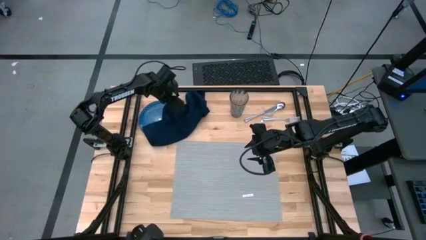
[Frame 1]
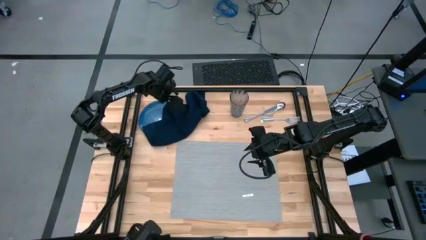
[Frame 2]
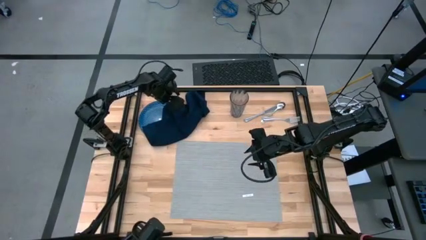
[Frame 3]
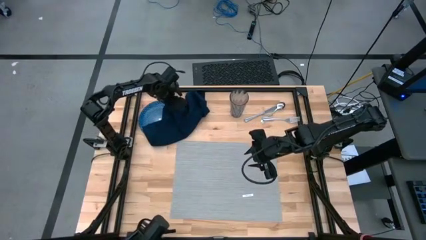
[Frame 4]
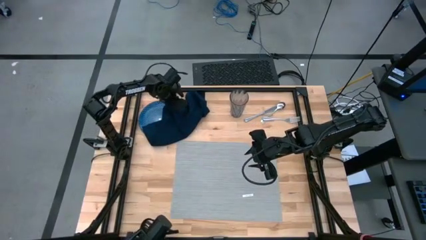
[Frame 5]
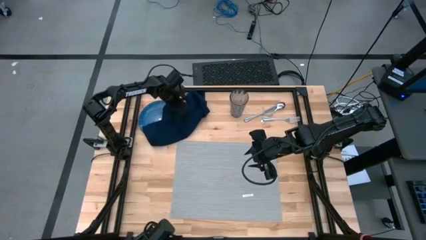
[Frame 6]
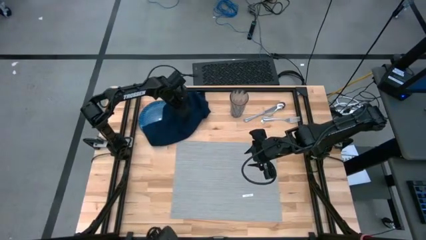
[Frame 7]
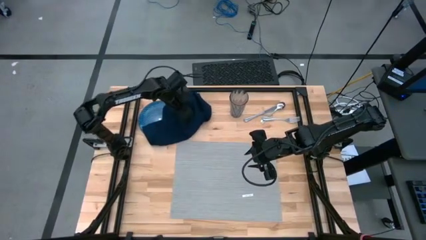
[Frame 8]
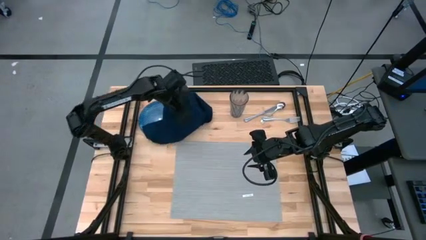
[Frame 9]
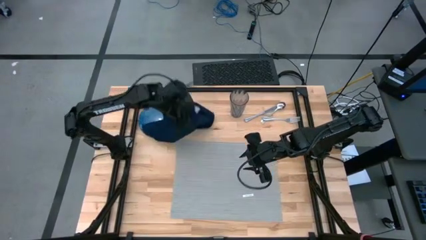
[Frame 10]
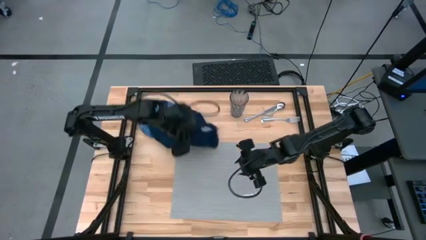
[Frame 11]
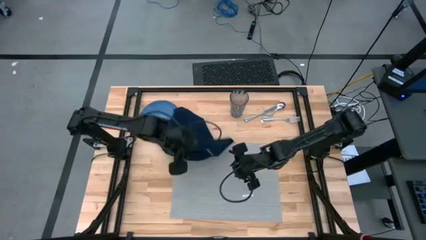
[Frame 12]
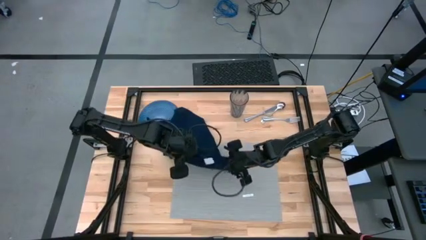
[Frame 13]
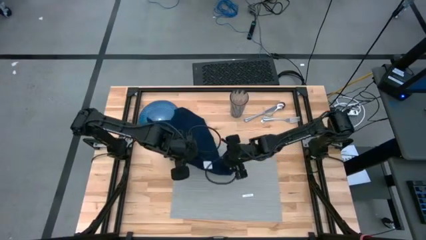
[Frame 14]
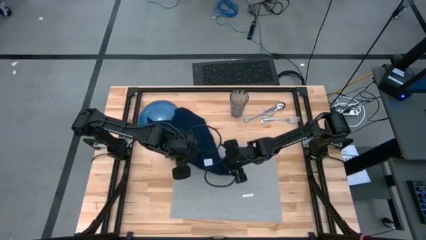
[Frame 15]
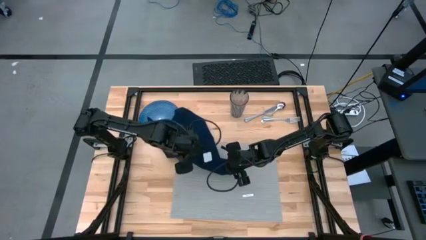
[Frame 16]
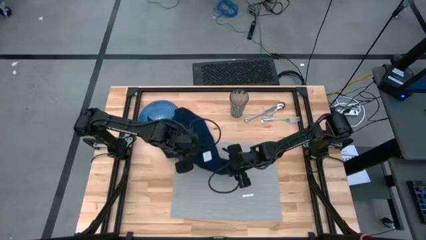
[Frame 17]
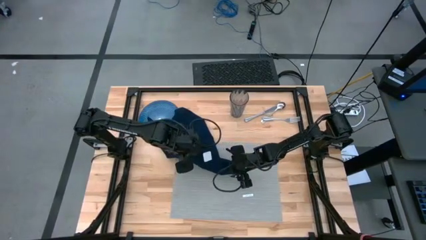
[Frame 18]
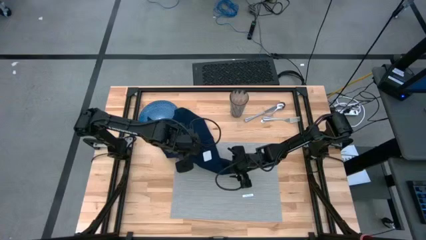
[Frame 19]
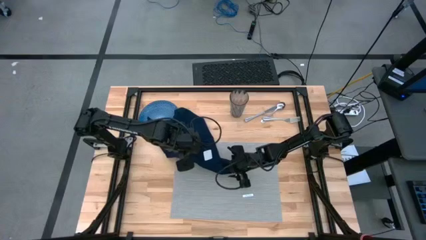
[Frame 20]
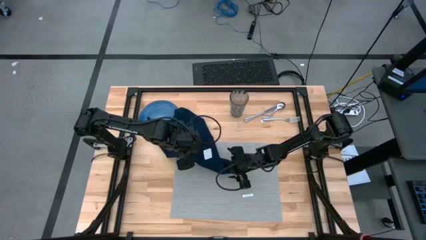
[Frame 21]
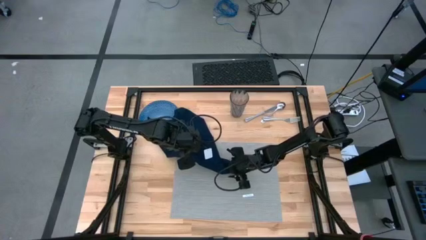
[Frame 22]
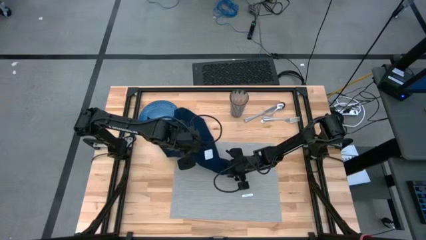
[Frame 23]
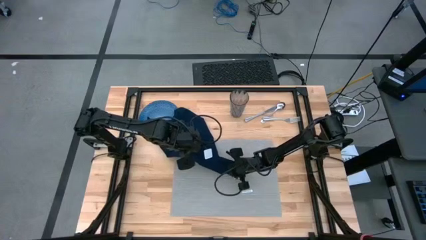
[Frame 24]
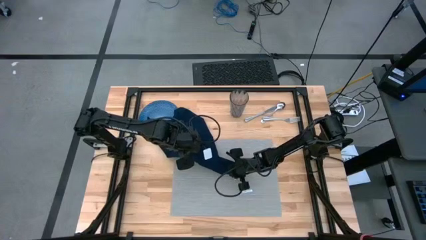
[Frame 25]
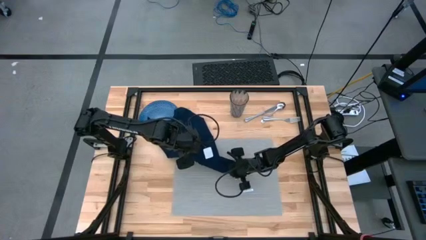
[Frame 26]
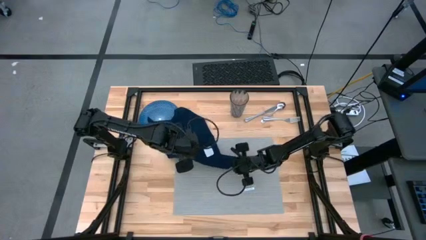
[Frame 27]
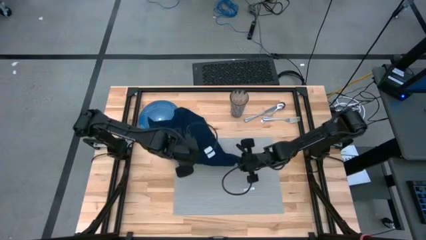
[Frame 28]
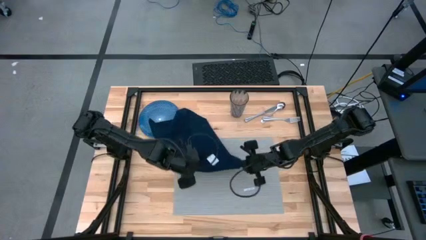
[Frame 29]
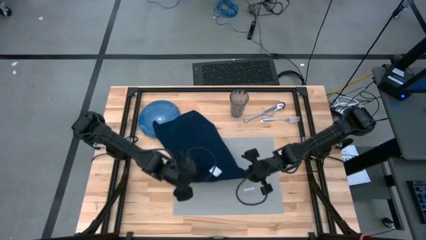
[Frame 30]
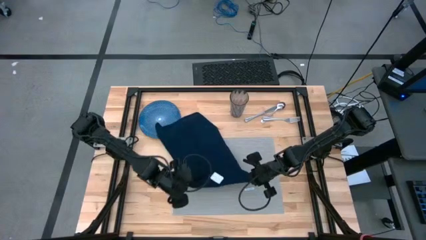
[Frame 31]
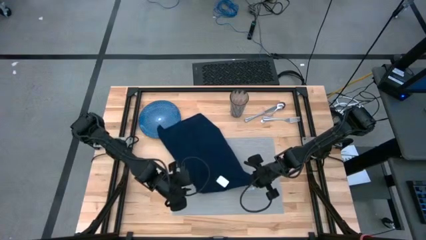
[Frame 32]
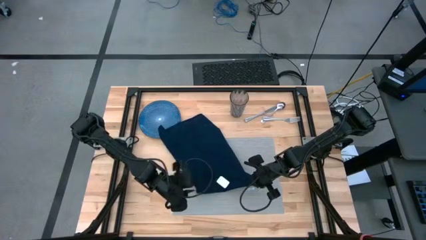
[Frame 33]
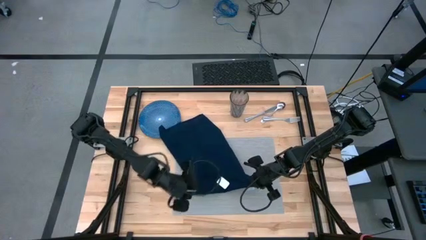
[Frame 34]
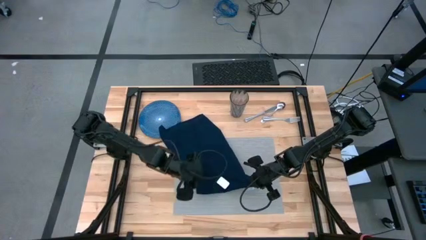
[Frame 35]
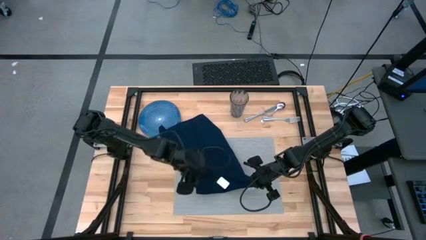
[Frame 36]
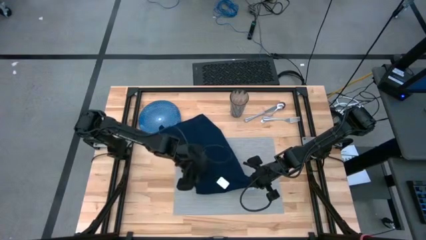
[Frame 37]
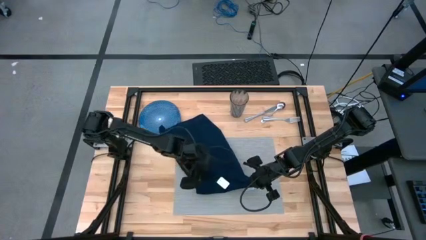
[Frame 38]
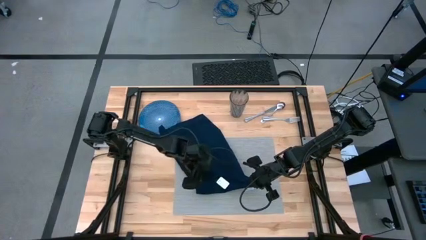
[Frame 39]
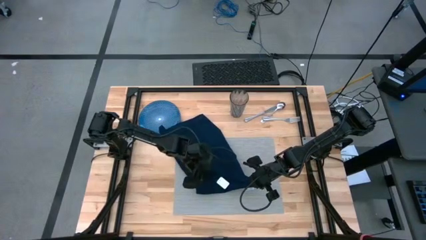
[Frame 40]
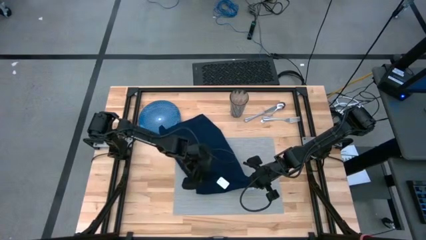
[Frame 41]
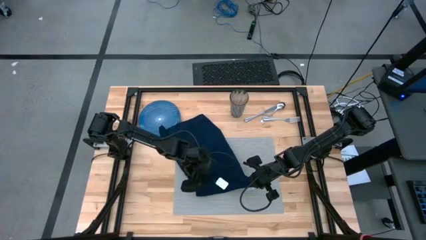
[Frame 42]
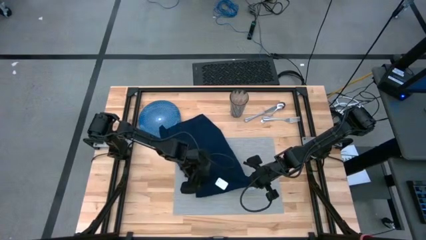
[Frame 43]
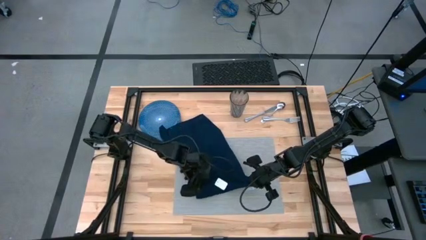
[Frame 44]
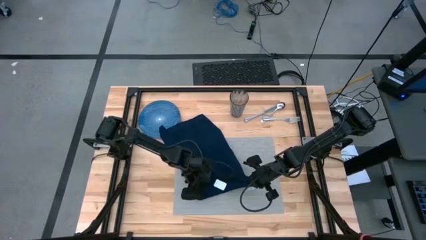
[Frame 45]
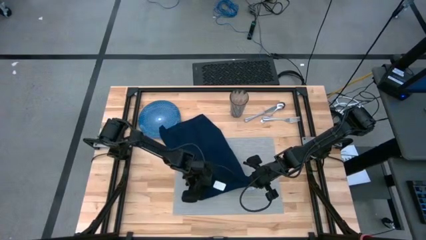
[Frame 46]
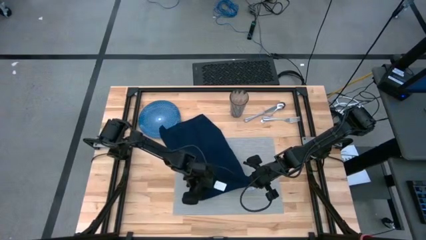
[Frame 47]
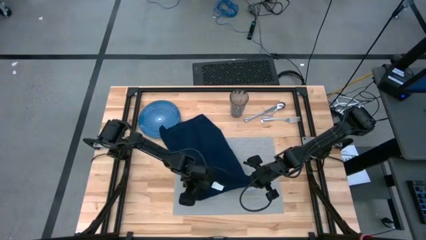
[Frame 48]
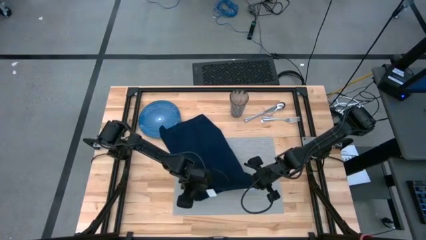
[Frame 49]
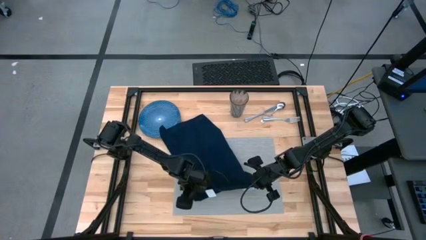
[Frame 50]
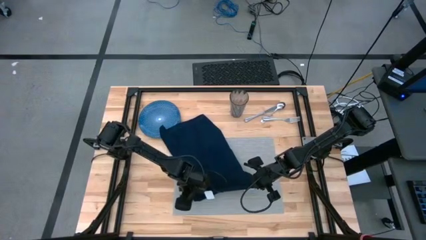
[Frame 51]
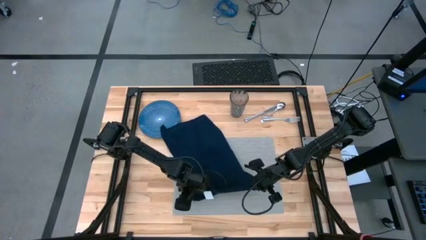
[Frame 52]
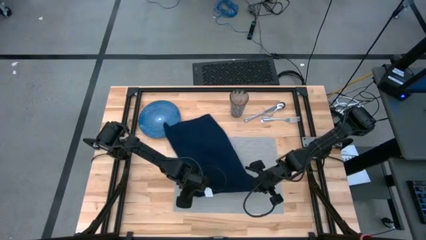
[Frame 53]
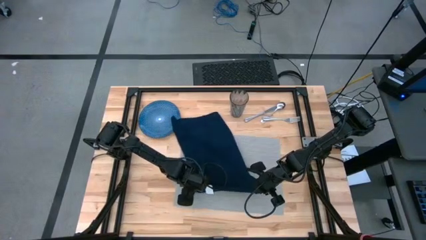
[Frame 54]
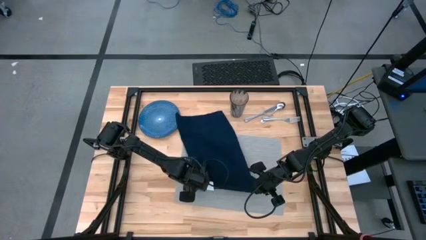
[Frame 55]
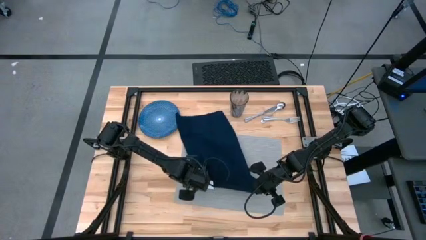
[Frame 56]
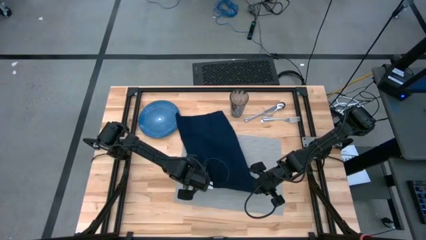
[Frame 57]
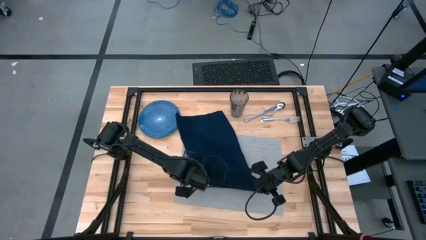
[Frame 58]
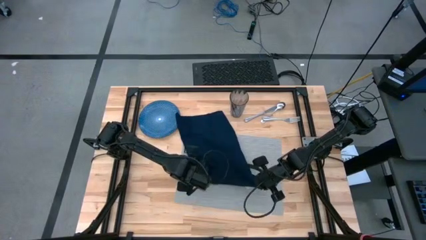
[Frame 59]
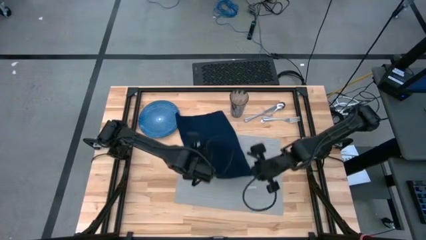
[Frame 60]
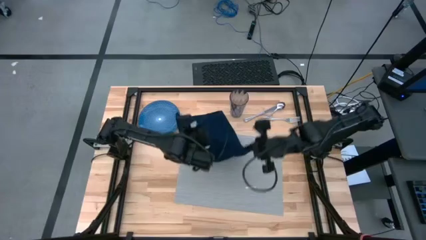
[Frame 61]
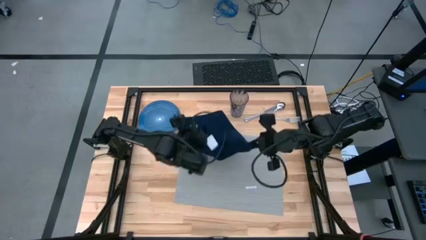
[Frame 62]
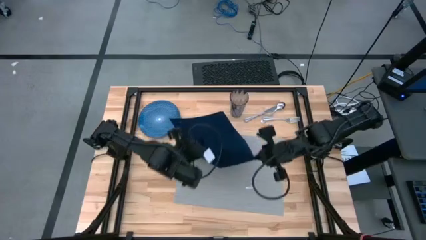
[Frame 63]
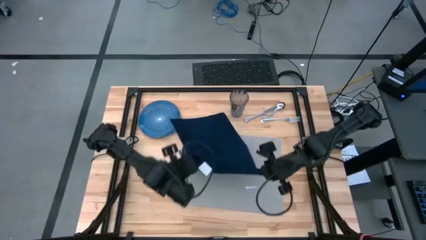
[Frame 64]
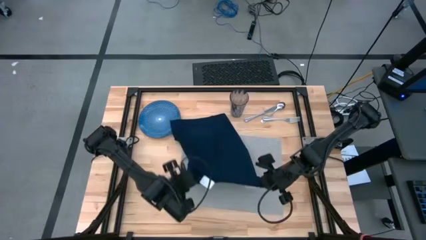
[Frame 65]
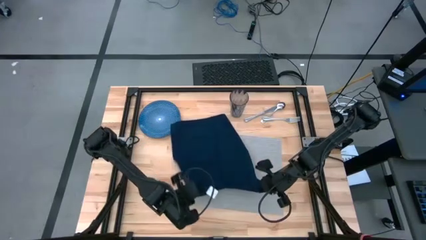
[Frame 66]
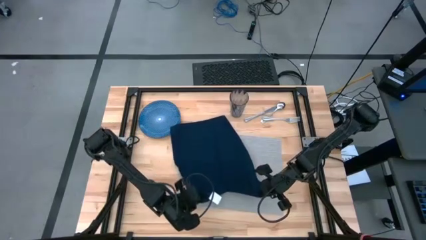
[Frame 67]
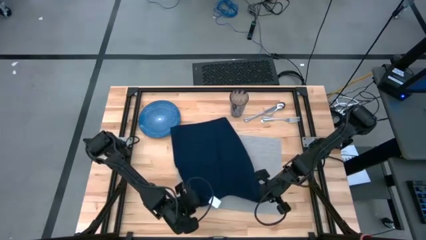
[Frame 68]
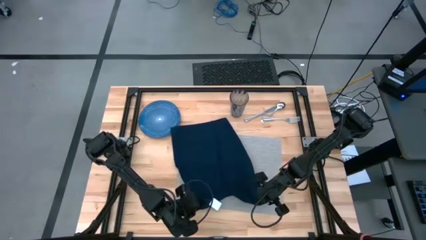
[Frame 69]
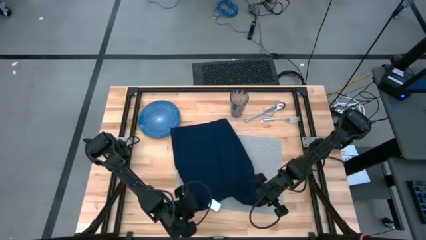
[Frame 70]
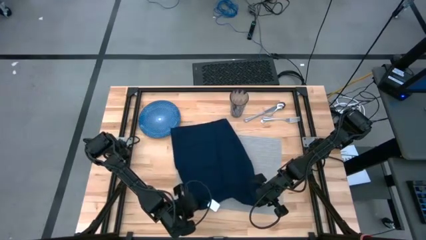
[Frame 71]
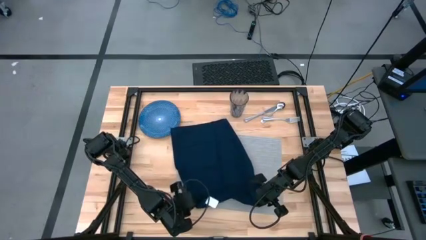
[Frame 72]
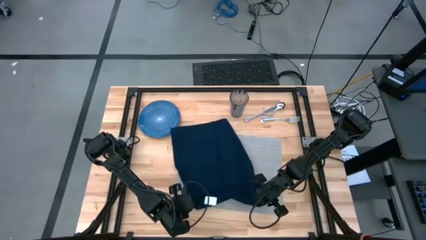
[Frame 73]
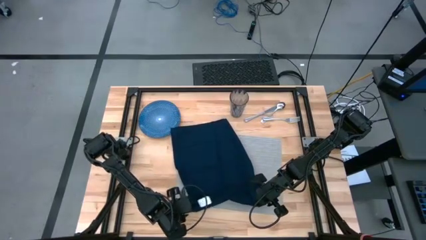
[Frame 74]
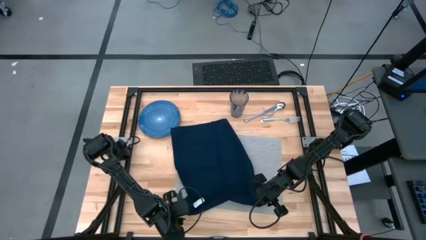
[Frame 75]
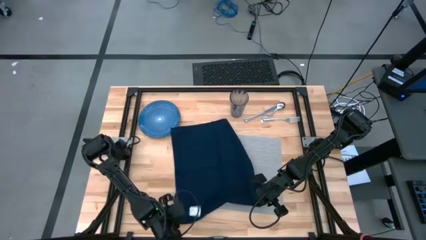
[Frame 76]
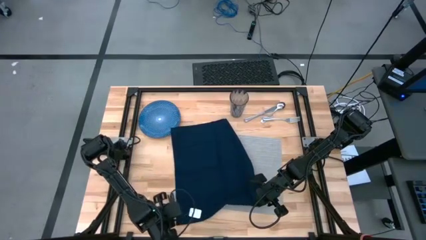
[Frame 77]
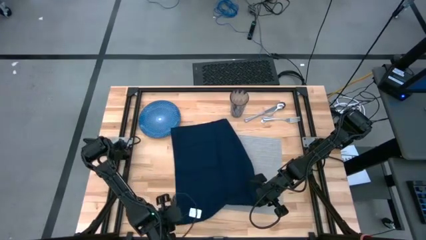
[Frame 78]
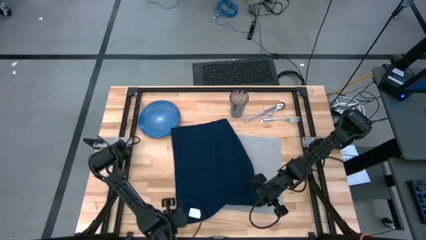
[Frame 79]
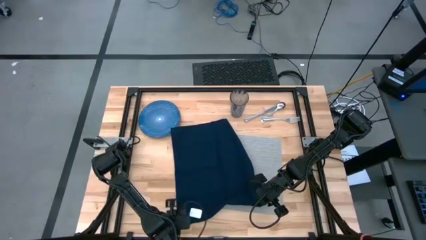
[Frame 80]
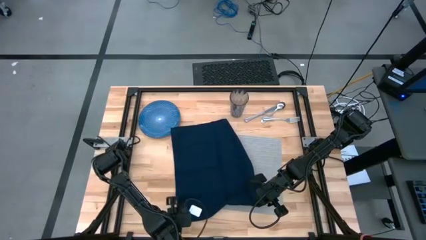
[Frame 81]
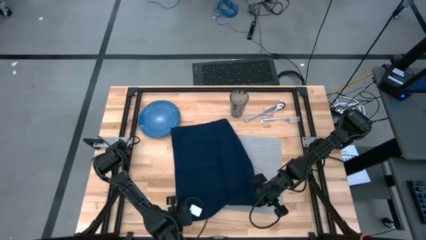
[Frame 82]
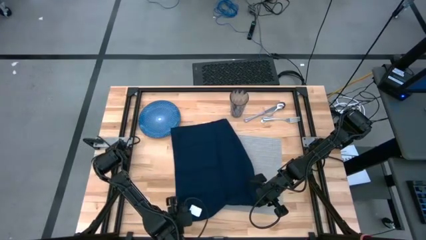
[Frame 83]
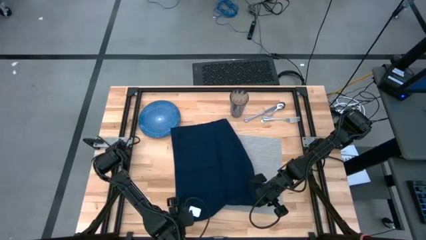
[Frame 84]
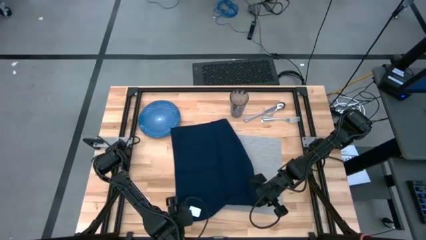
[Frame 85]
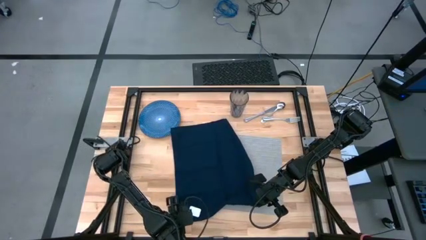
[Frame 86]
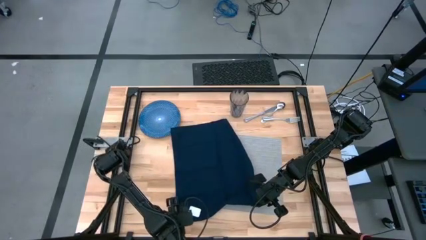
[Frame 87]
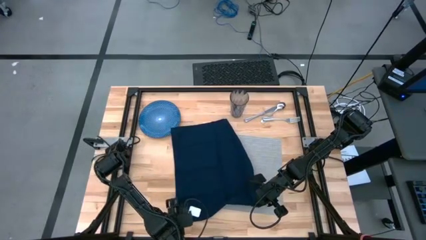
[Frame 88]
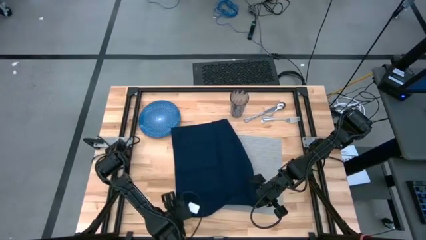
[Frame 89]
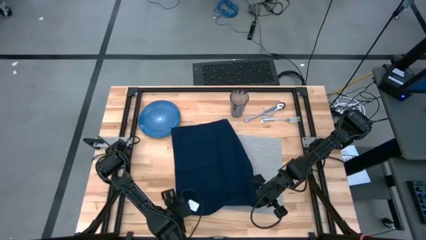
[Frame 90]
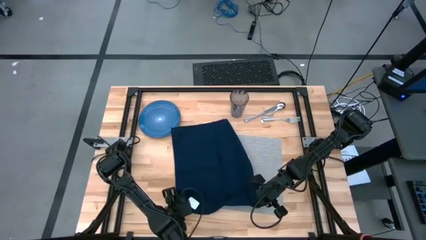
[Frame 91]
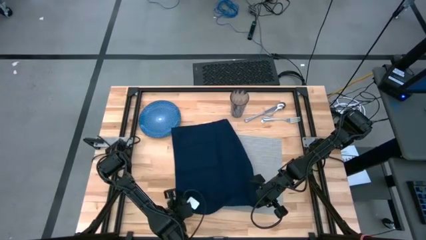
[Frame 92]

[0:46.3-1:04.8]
Task: Set table place
Fold the blue napkin
